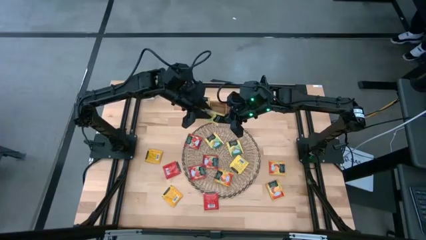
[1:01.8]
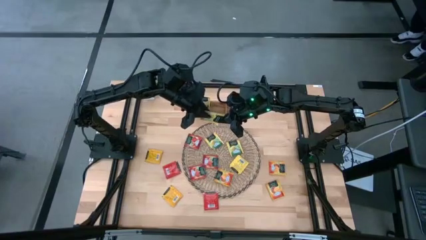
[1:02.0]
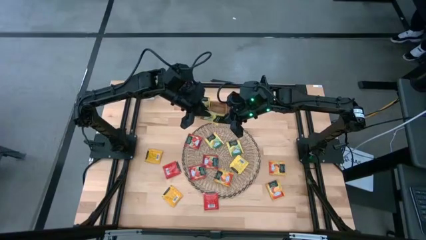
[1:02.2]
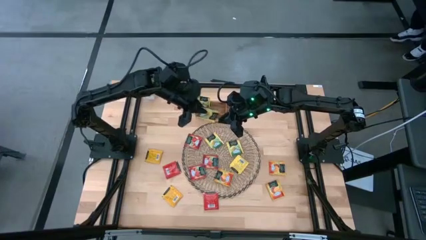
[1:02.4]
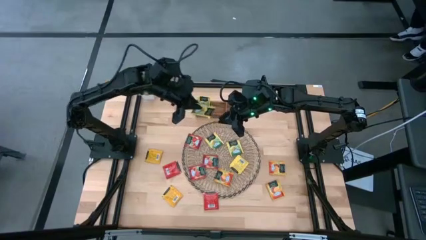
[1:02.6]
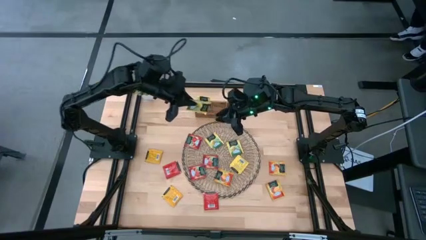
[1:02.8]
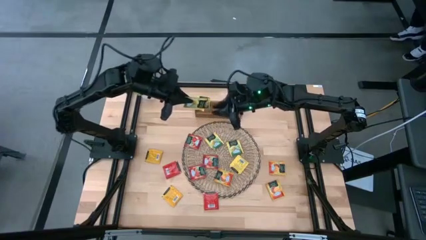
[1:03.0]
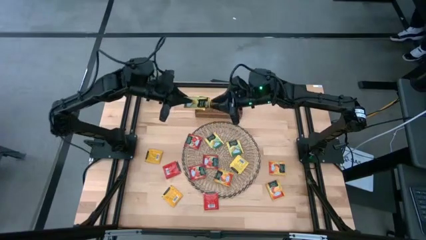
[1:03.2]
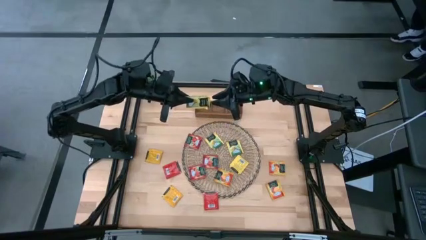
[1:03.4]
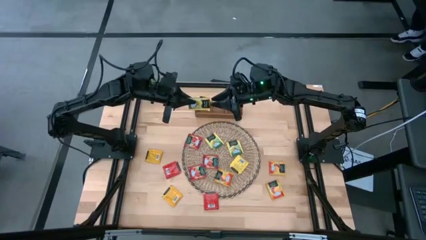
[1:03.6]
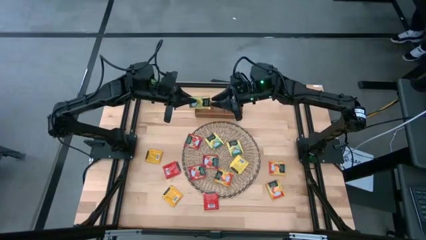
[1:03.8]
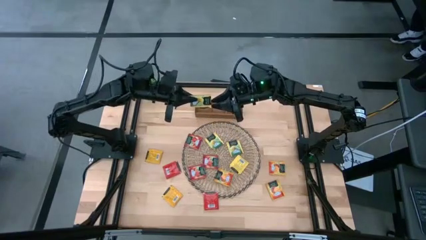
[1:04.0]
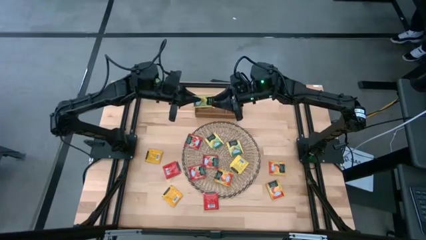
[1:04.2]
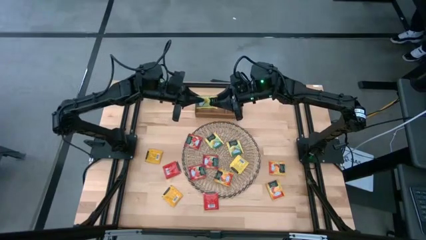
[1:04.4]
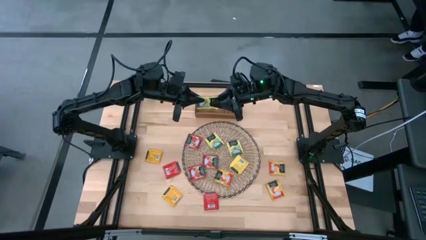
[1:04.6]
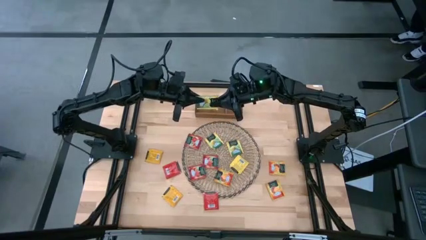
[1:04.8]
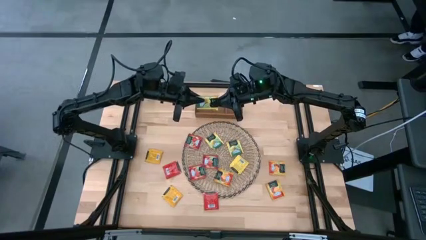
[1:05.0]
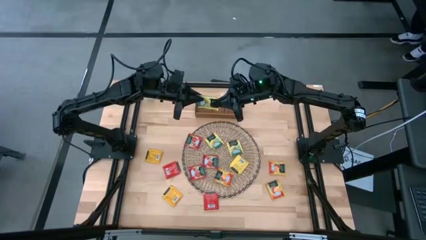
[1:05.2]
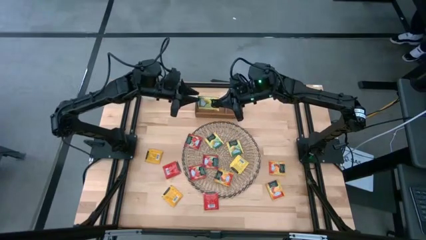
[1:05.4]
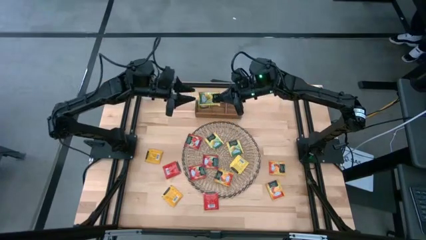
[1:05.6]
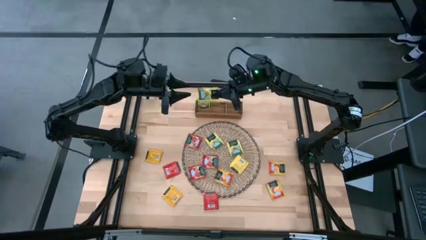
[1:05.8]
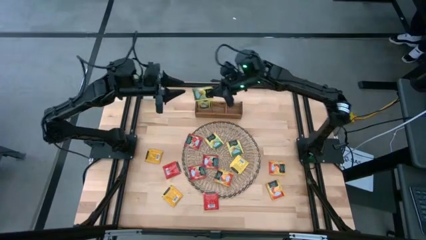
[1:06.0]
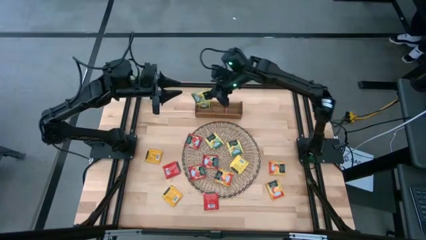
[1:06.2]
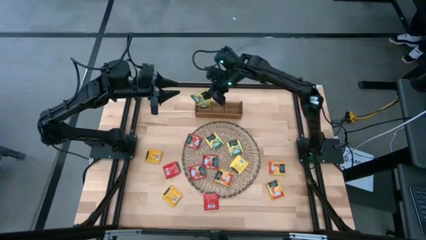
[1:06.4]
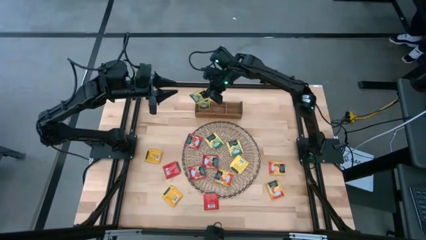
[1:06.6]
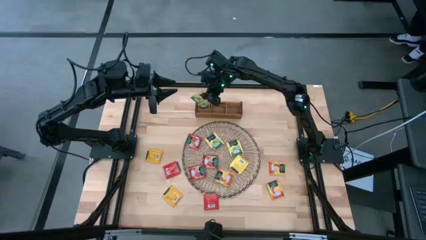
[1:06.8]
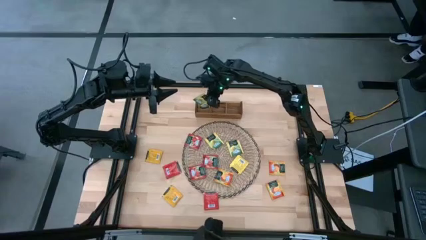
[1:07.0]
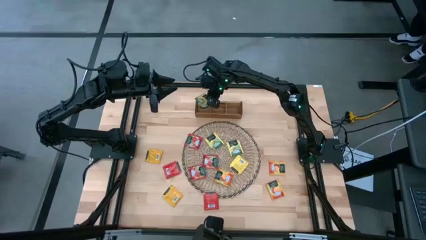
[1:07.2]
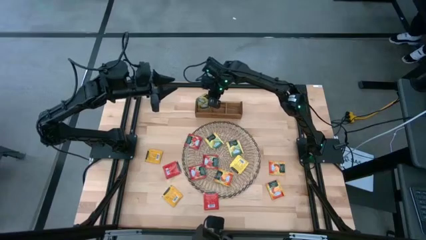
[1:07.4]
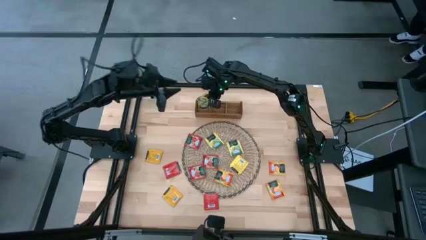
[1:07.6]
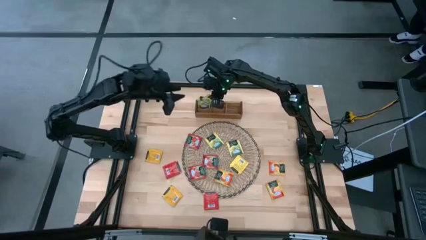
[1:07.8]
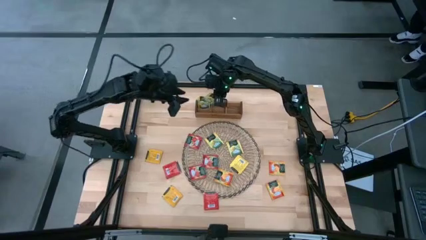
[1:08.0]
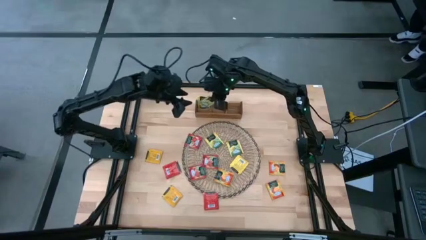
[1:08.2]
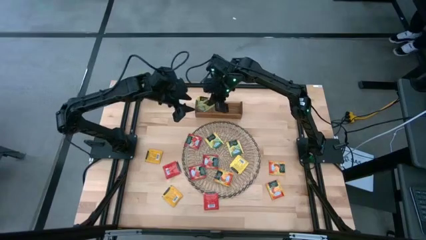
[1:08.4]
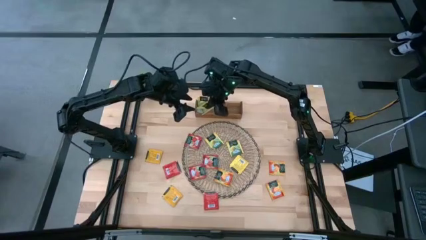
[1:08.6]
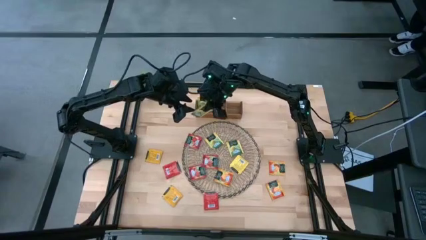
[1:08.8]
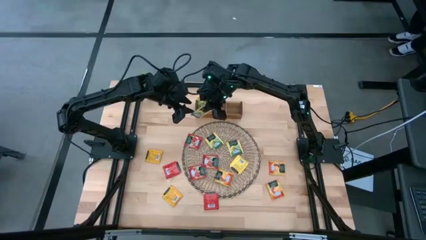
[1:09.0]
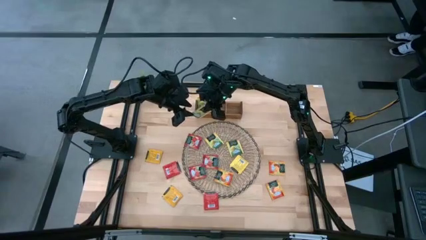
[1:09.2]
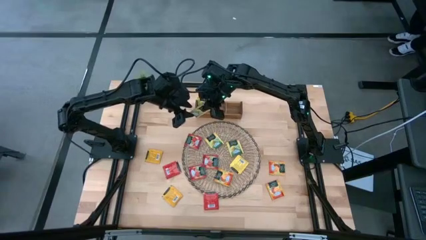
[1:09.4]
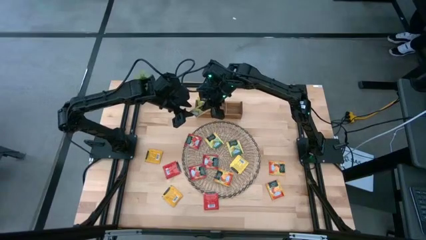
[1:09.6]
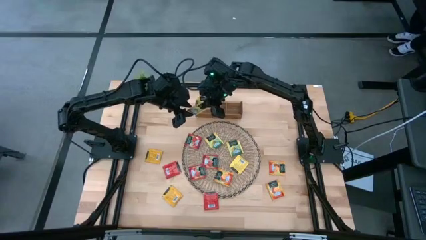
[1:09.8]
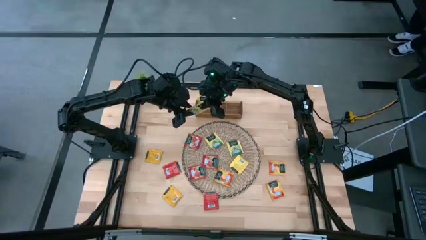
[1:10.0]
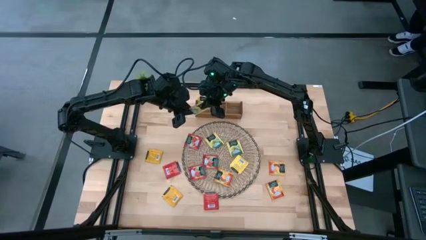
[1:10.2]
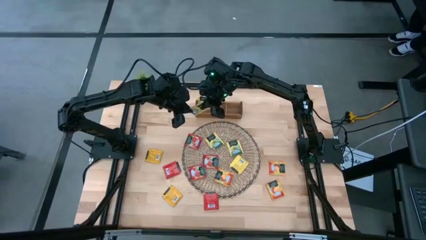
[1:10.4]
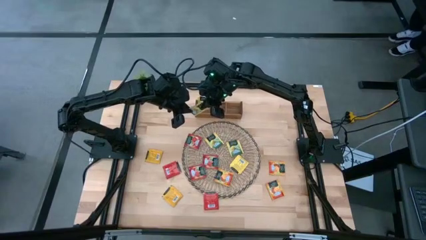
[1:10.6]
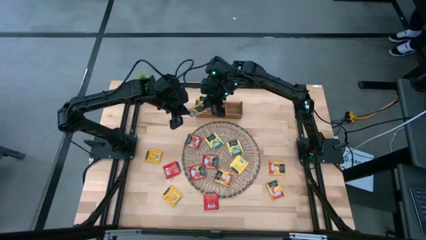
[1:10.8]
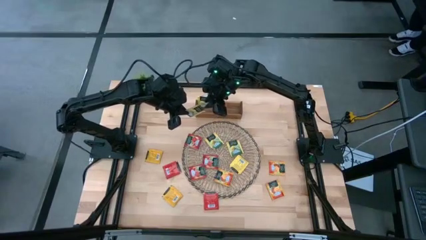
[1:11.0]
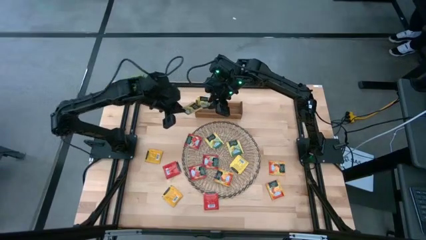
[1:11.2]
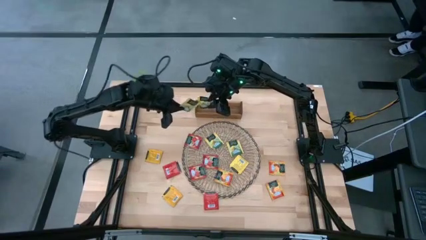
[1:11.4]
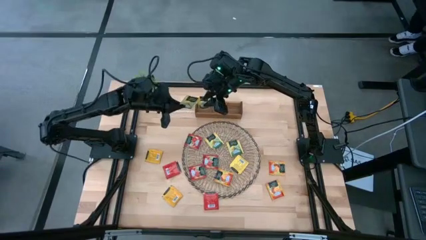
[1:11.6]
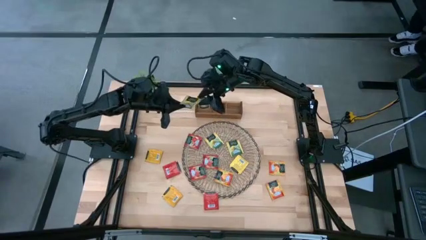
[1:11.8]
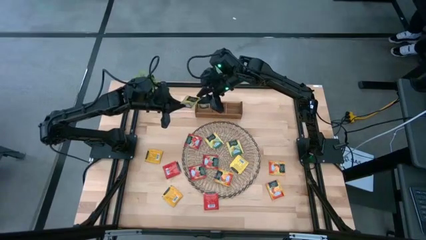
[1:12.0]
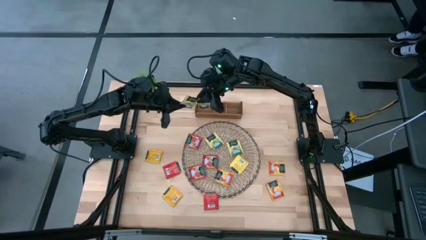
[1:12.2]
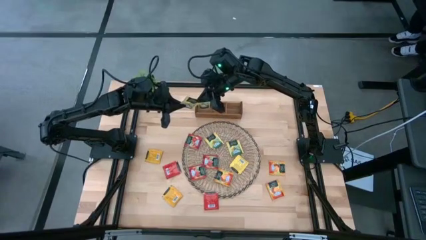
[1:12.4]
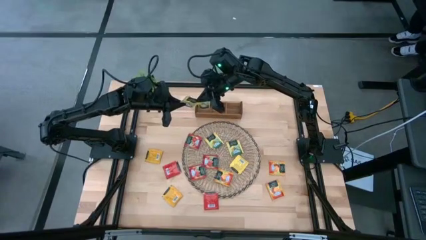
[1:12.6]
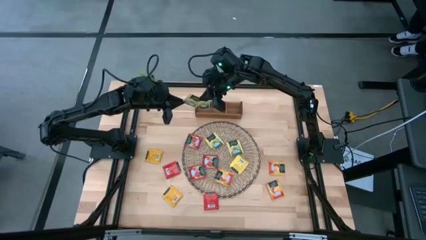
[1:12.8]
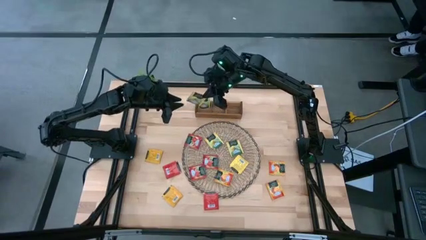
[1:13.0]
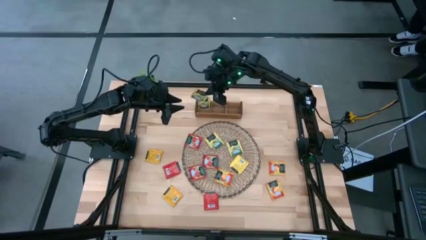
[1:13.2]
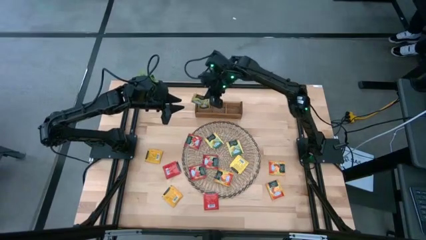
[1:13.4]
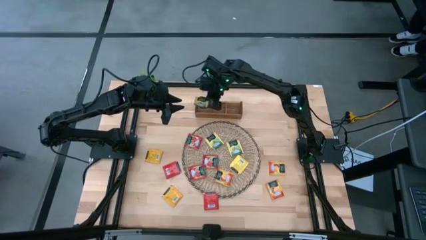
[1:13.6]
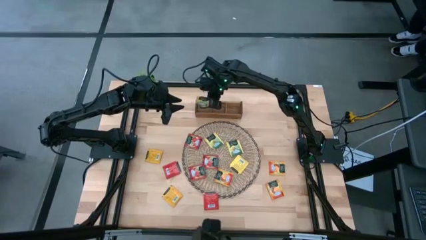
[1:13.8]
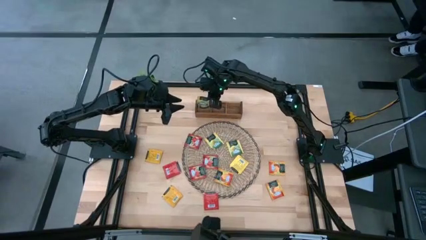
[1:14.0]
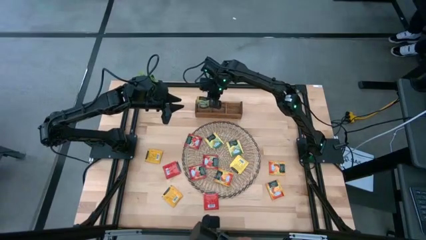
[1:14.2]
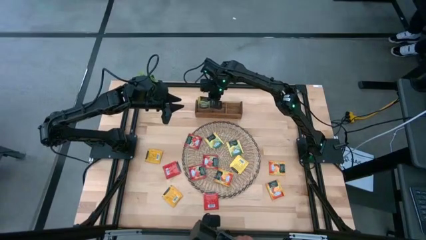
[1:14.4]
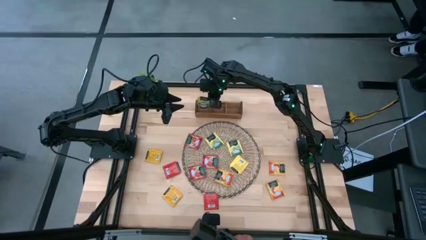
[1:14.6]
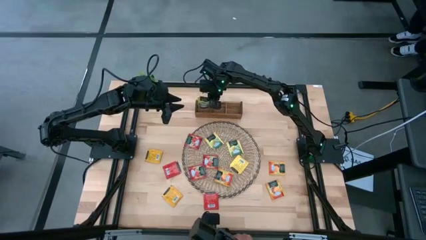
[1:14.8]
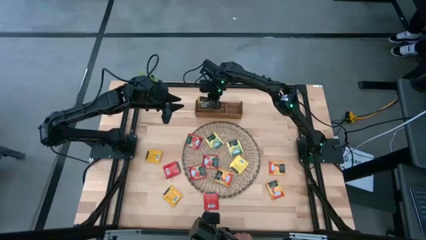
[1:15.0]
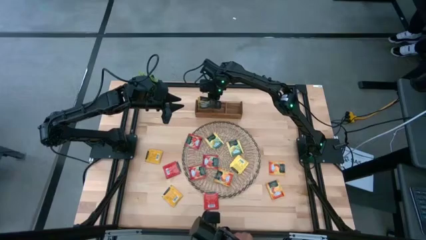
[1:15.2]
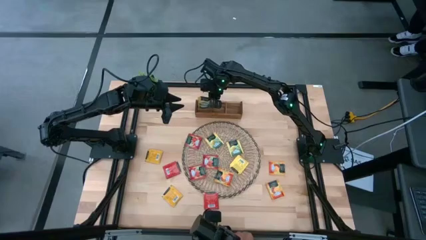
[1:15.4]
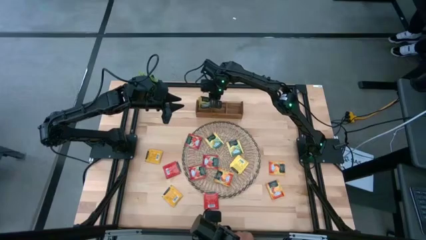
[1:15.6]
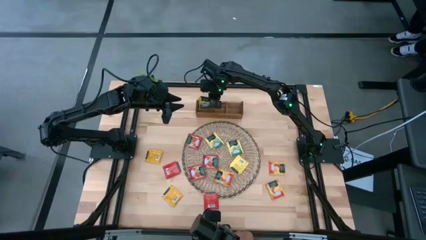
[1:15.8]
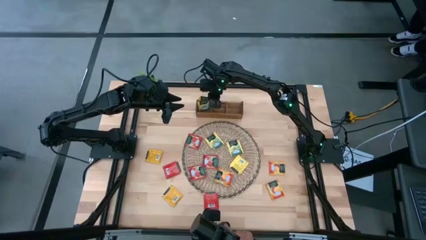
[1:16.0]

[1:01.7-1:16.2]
Task: Pick & Place Tea
Put the yellow tea bag into the left of the wooden organizer
